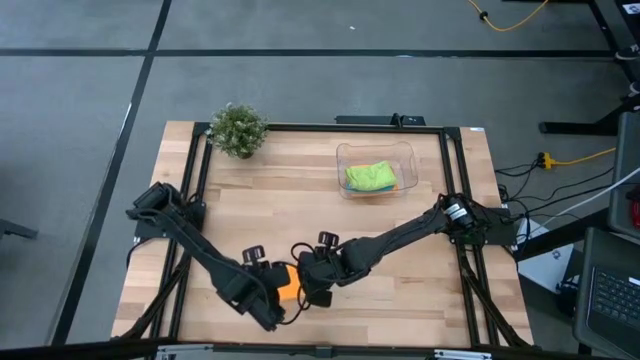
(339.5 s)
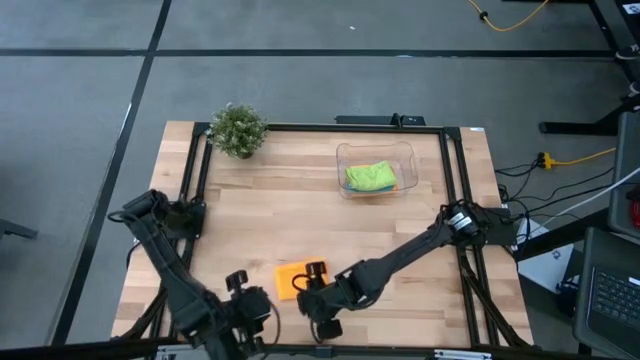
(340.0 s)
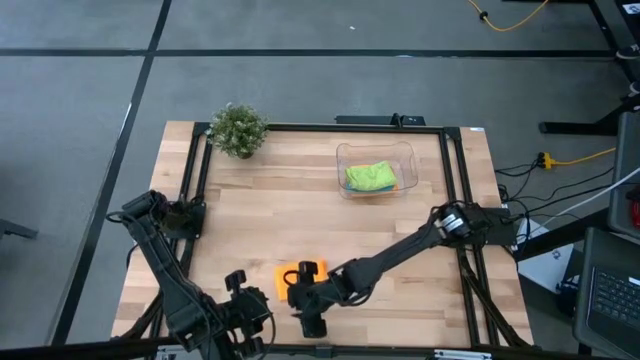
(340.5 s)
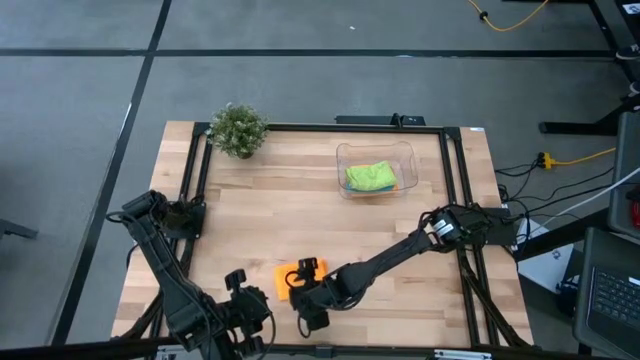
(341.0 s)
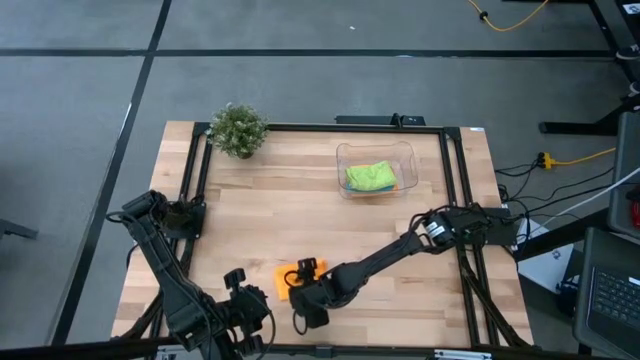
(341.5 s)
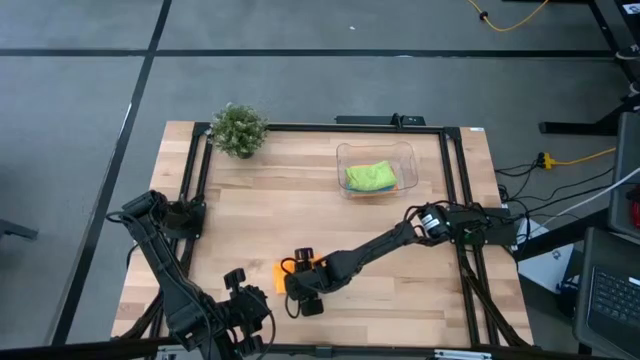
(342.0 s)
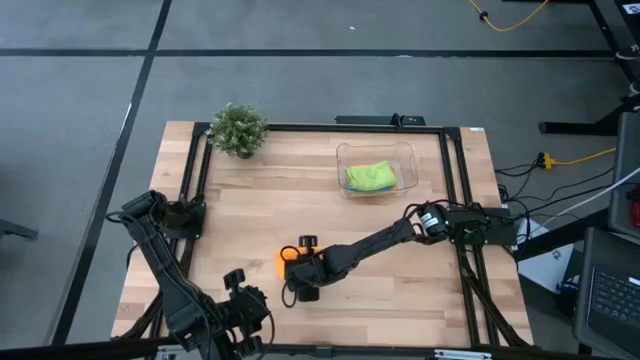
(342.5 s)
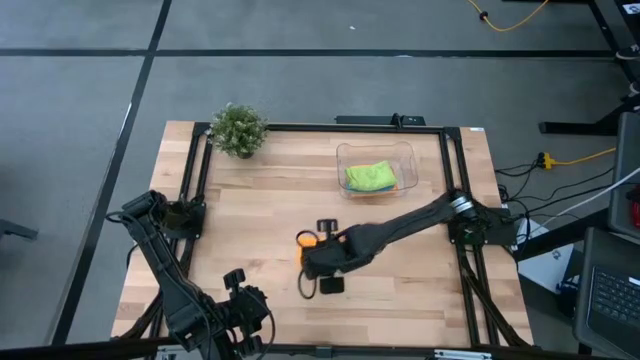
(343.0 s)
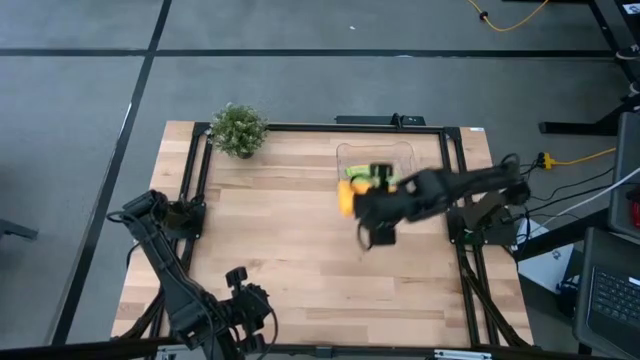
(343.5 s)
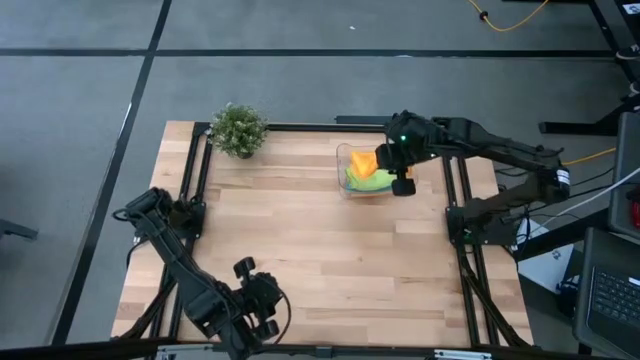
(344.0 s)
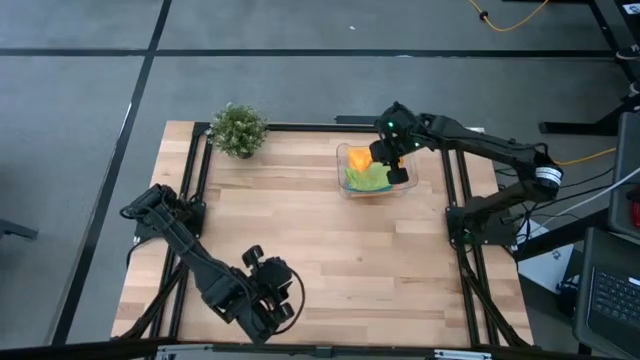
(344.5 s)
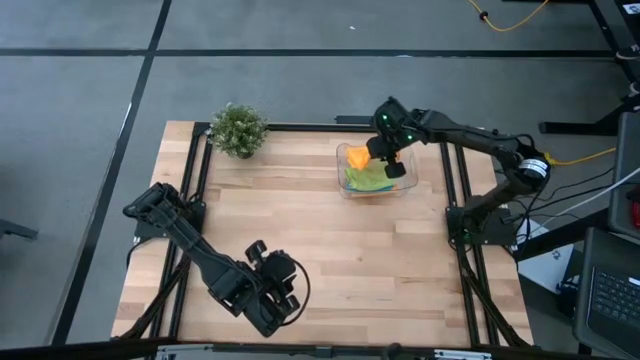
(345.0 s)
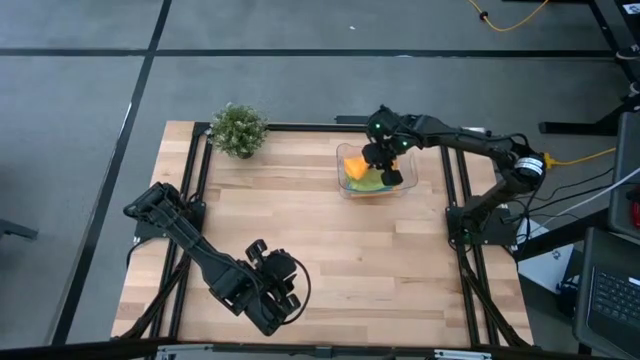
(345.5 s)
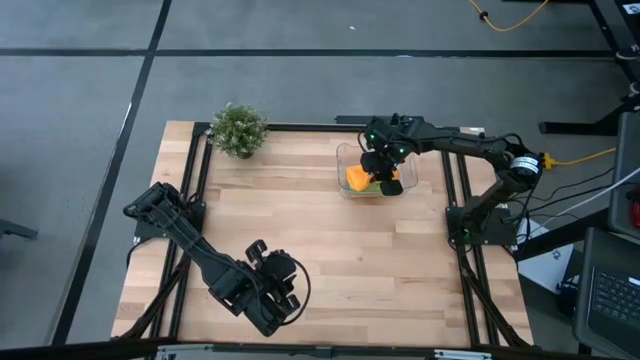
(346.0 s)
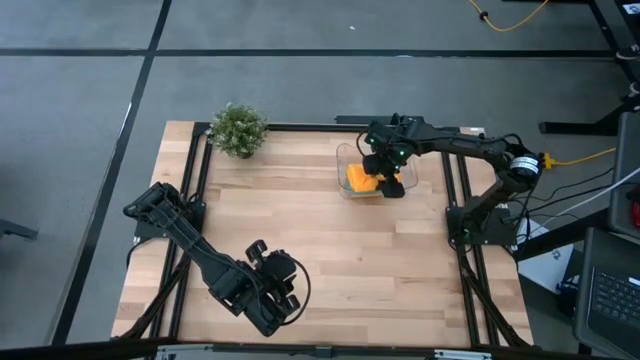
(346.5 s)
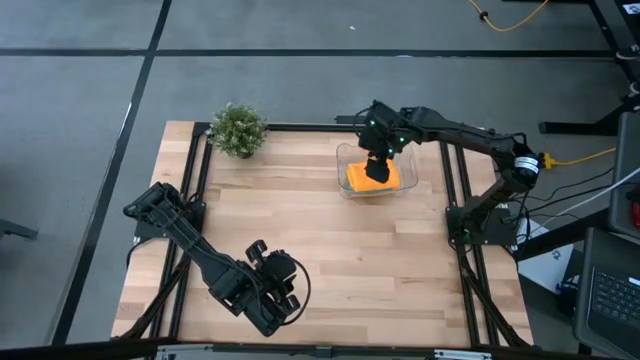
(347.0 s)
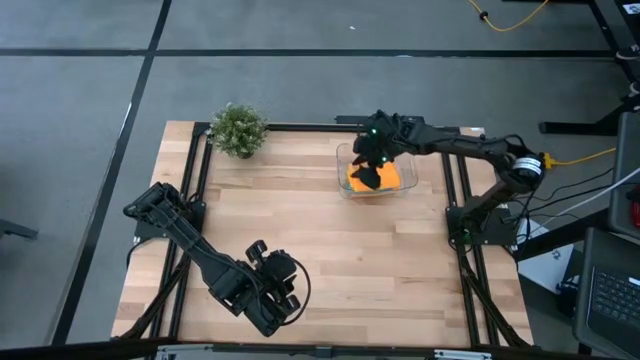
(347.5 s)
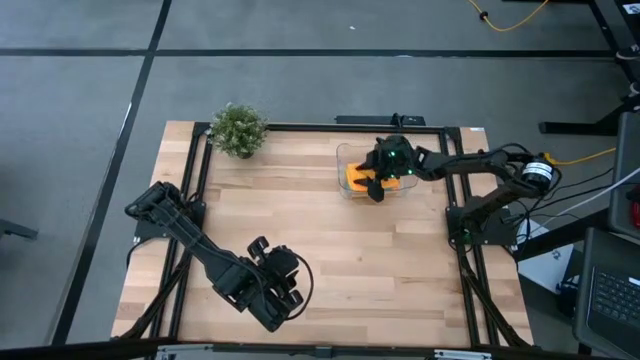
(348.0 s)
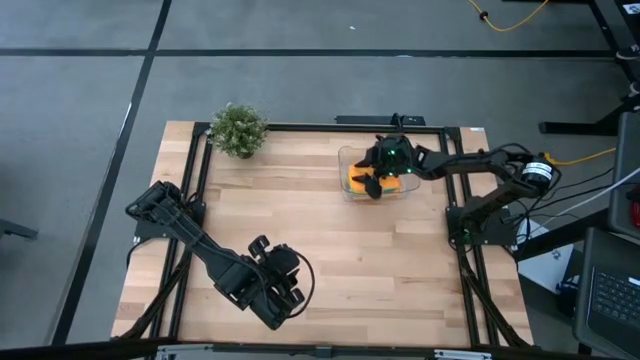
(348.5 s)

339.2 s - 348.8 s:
Task: Fold microfiber towels
Stack the orange microfiber cloth on top of the green microfiber cloth in the bin

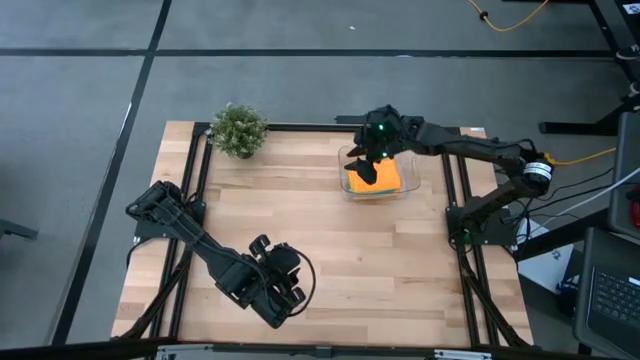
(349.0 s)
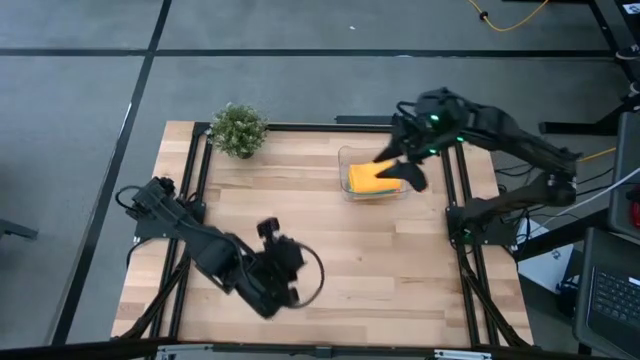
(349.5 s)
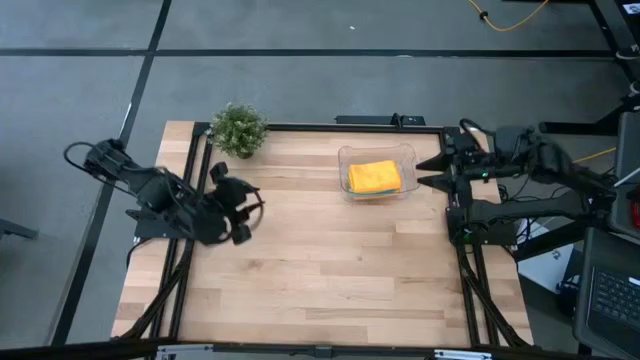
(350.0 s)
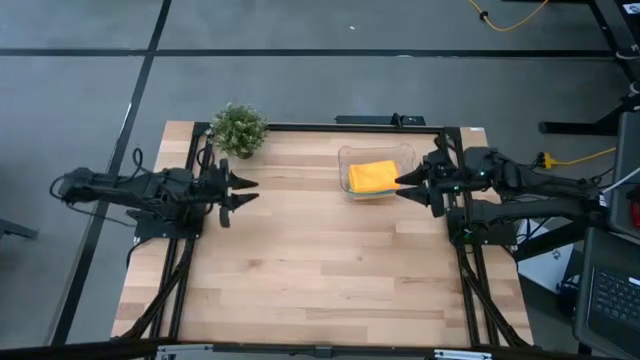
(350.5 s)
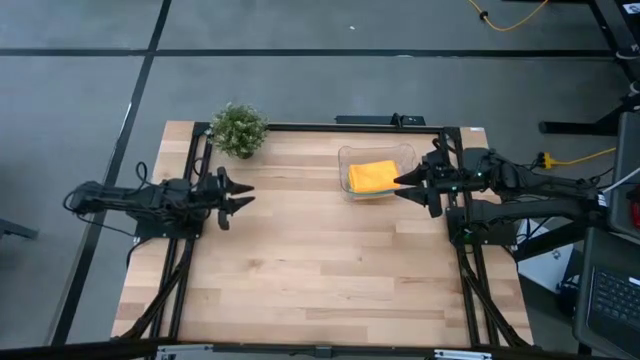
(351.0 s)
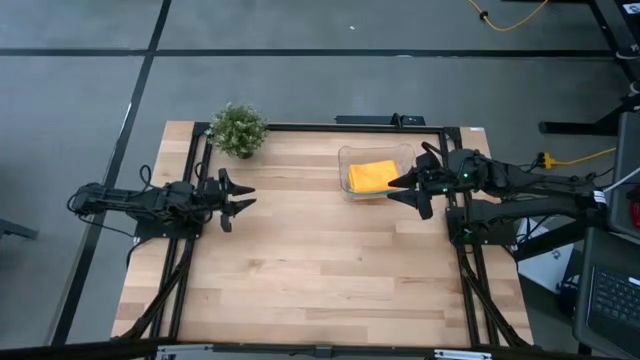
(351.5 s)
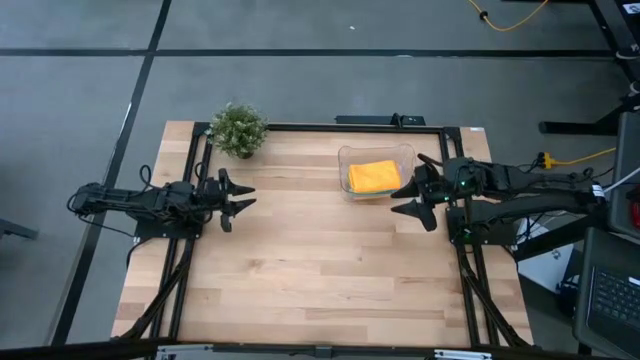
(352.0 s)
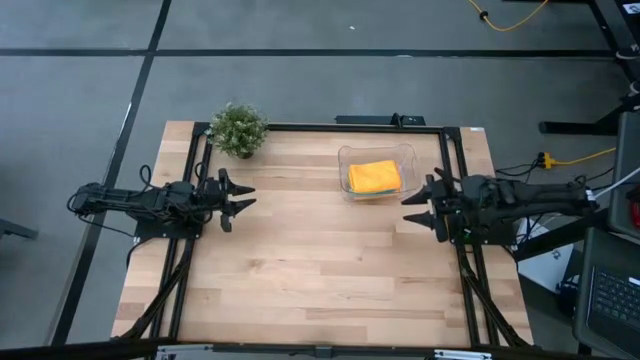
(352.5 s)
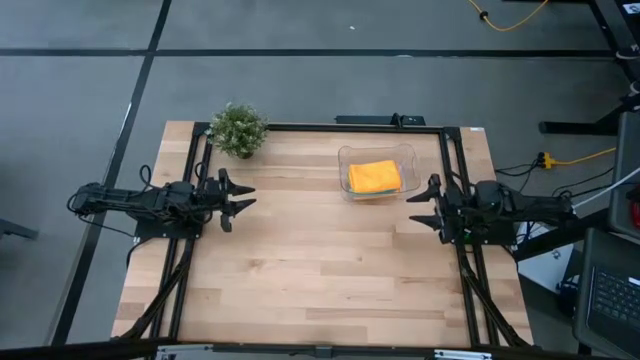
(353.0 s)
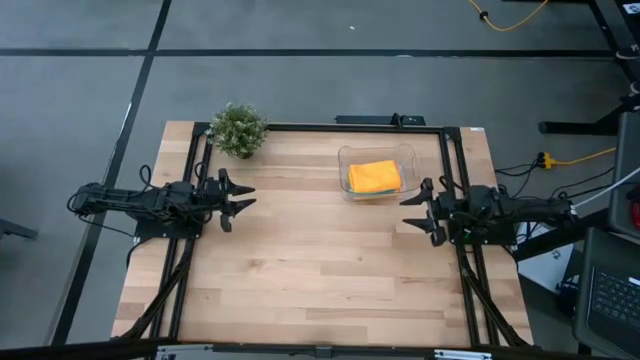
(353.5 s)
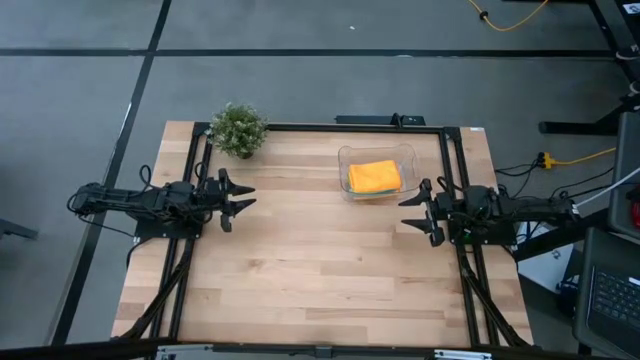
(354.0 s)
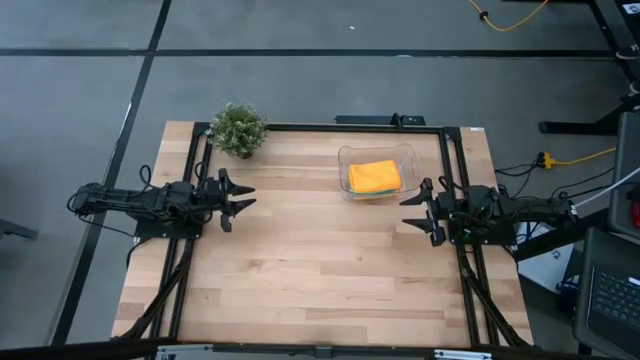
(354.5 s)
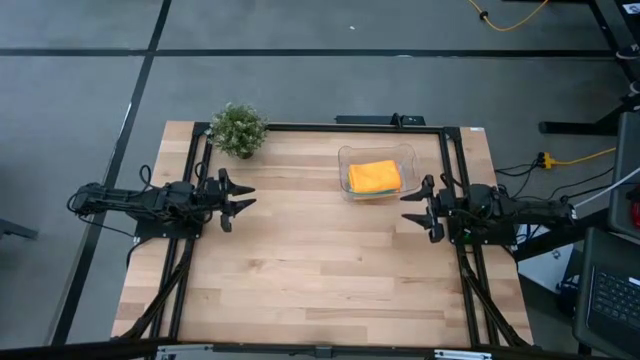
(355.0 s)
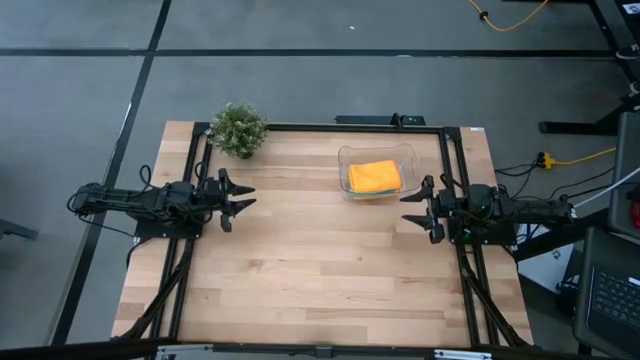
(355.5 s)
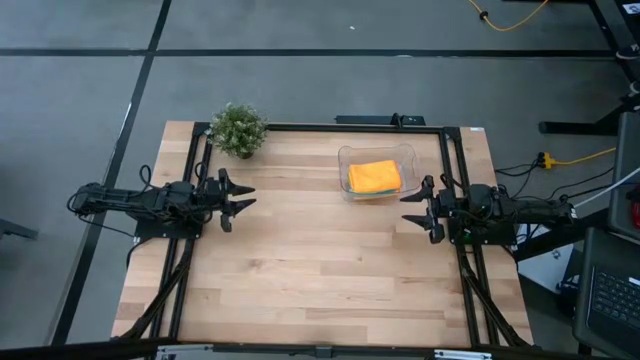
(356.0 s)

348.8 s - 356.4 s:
Return to Home Position
